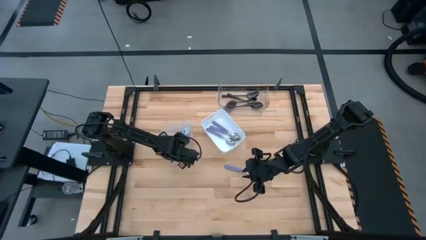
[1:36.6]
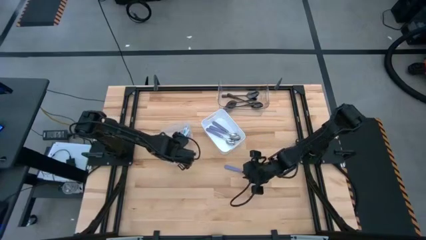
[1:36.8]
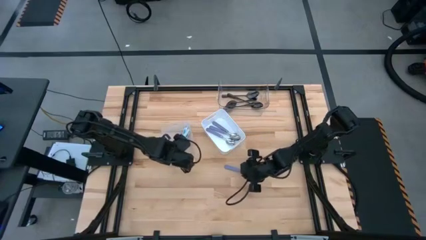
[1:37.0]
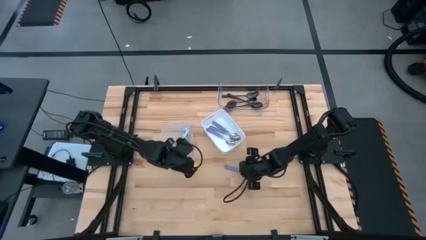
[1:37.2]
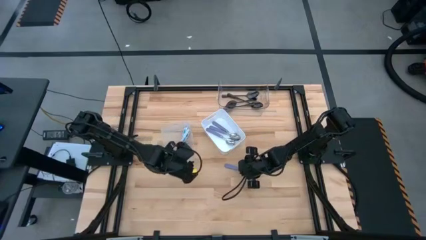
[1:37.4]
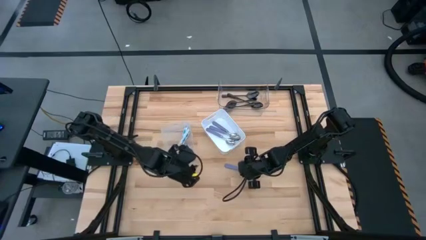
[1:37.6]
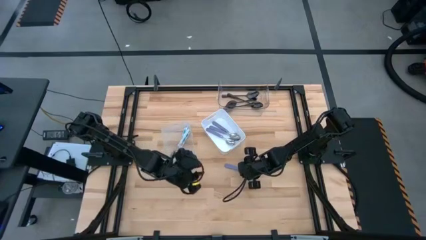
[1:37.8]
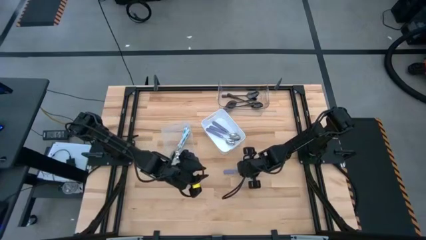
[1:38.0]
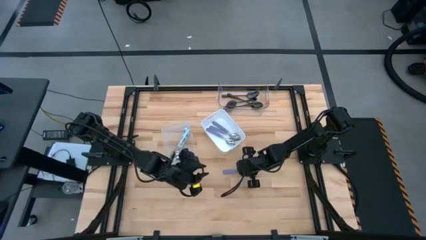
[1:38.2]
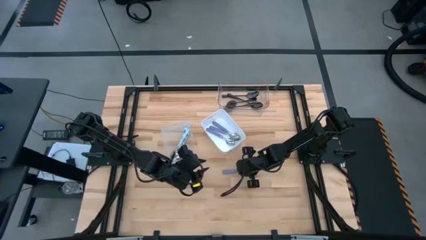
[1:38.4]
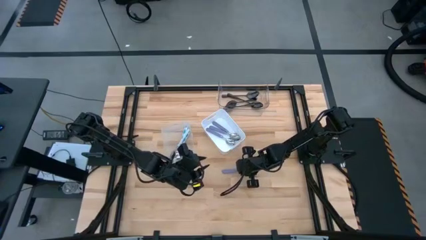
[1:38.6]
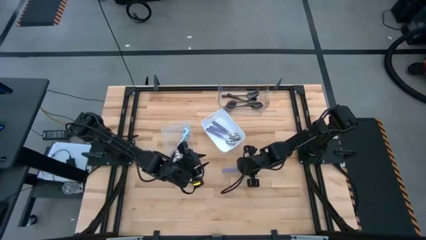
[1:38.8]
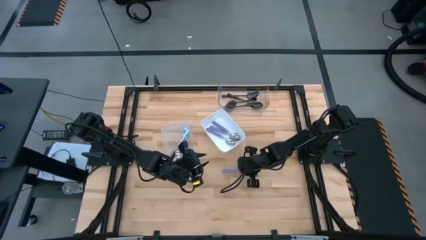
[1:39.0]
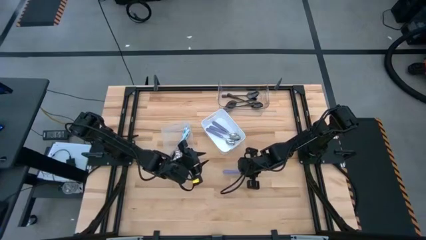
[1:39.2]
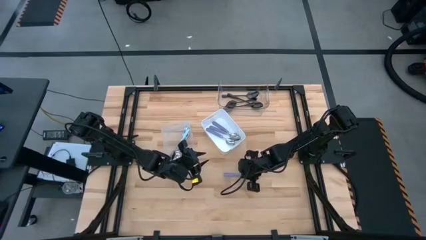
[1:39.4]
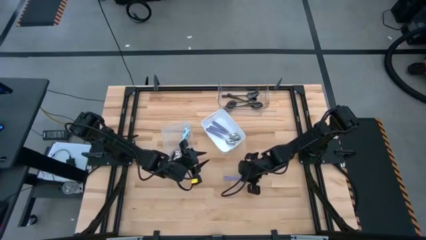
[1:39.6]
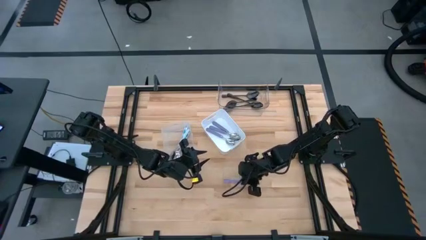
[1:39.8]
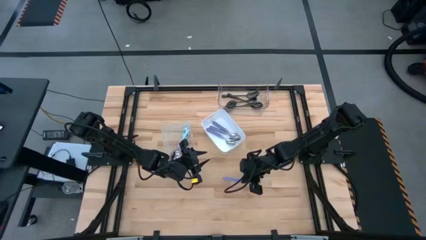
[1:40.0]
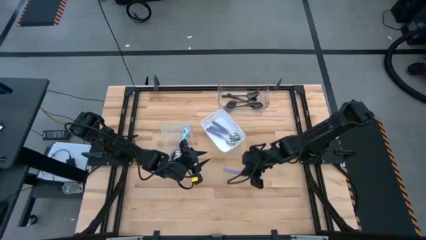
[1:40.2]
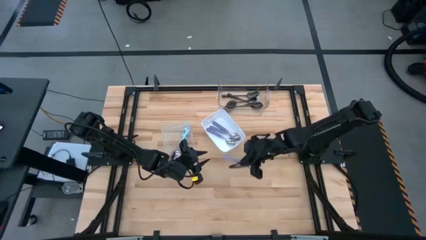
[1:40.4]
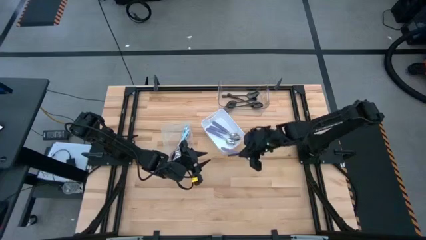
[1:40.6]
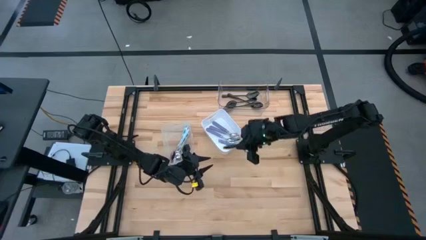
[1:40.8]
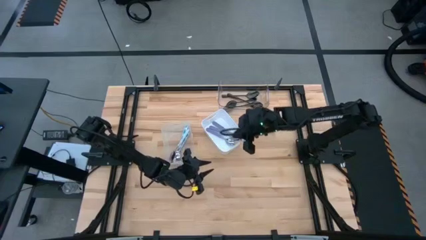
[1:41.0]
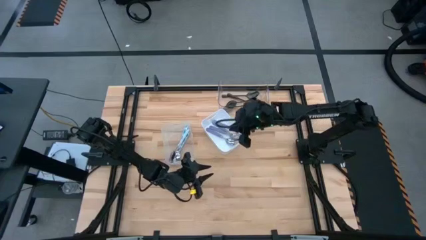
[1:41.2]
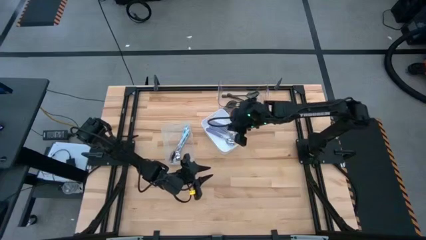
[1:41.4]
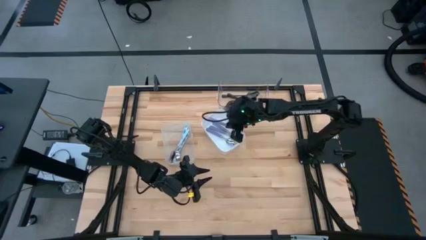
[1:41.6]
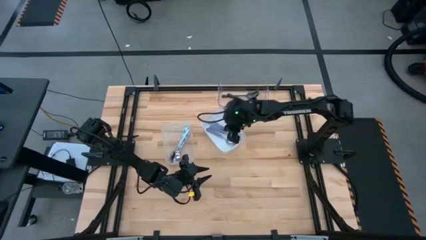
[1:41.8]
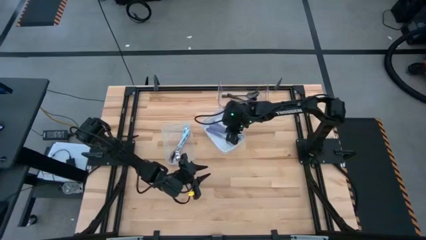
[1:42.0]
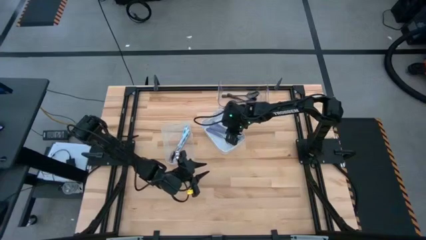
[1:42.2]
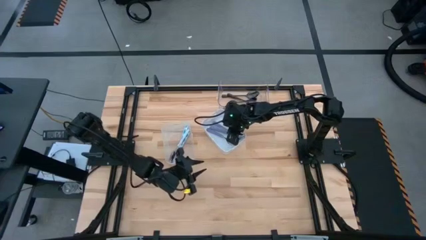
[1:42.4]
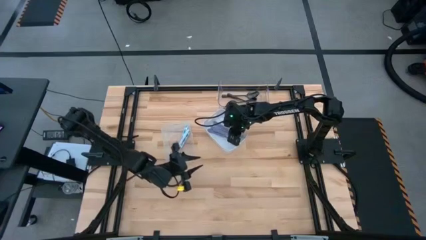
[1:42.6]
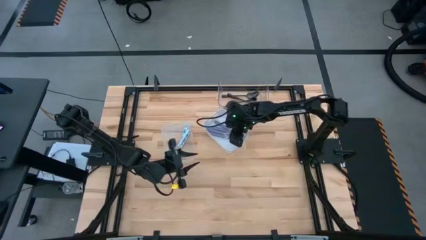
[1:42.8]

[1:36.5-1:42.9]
Task: Sort silverware by color (type)
Put the purple spoon into the middle white bin

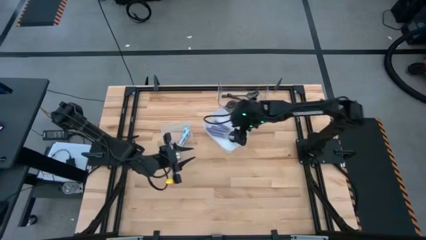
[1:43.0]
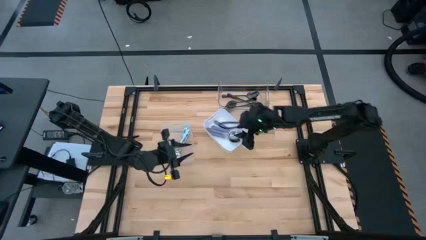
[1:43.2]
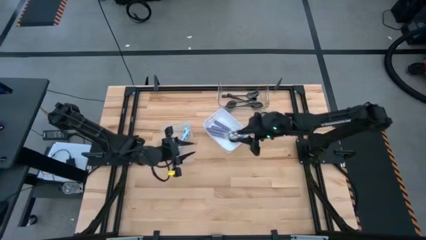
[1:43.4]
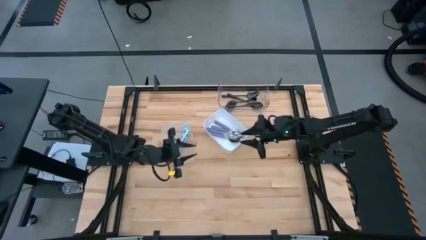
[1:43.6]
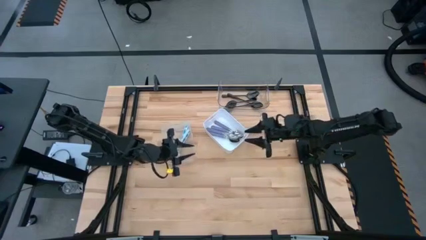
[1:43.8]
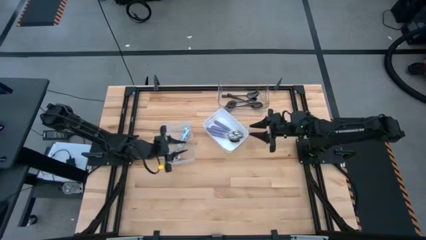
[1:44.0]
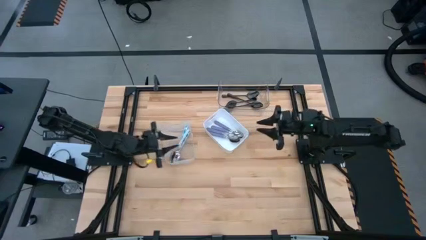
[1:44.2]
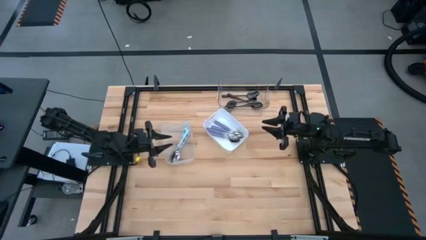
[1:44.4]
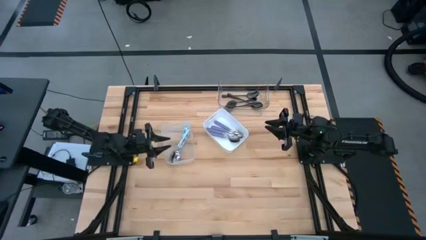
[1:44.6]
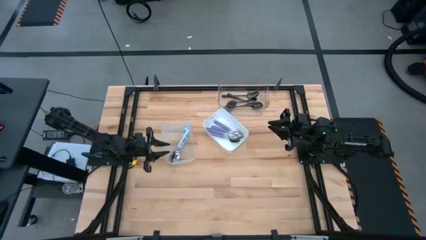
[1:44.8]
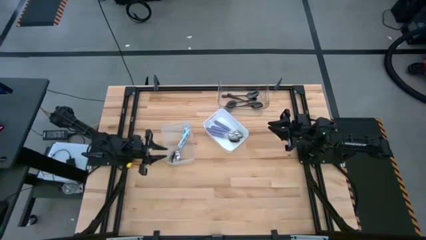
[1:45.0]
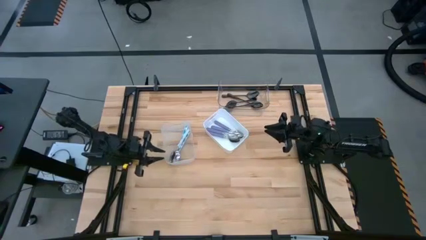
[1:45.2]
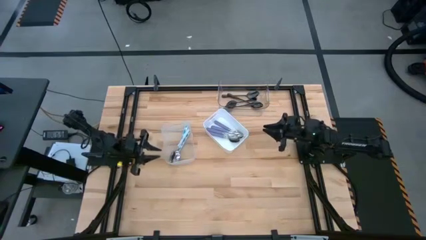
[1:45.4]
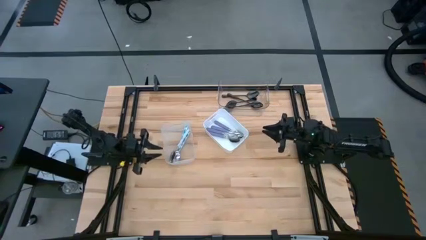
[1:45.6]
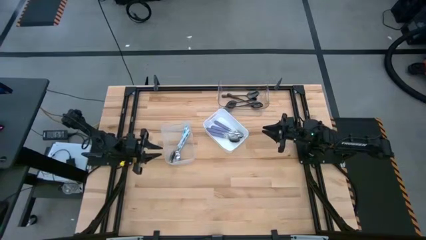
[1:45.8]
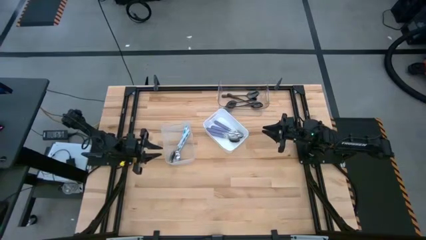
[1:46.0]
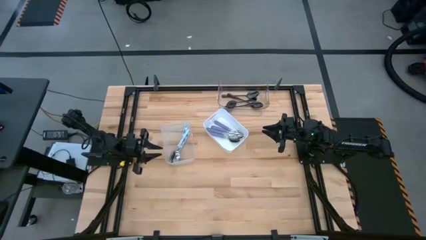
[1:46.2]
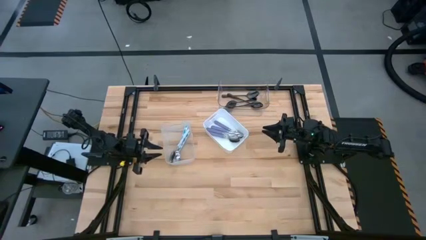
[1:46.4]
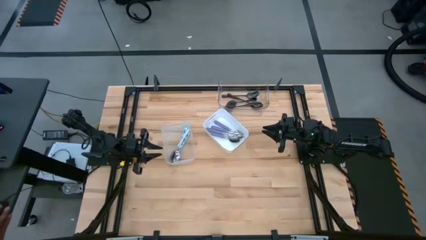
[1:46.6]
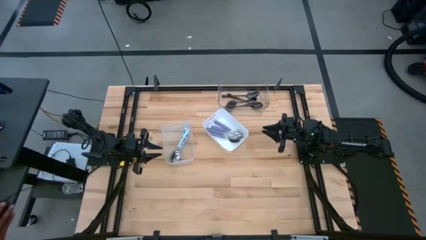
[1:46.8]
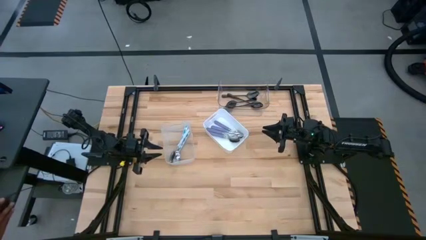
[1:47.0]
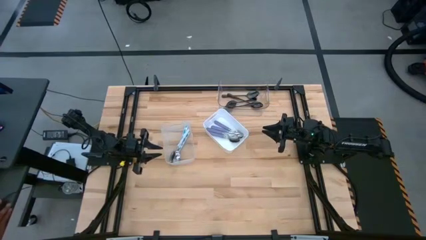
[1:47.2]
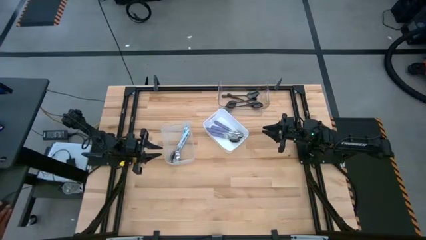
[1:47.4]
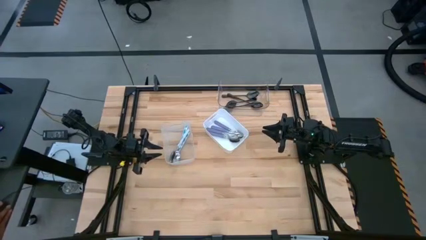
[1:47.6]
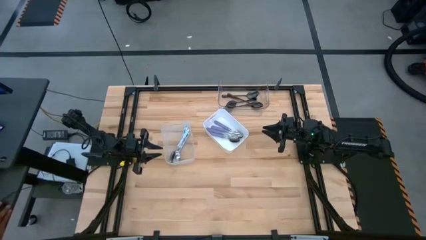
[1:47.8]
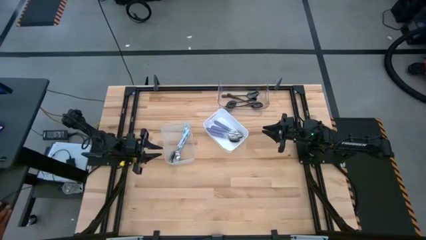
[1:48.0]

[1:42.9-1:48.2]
Return to Home Position
